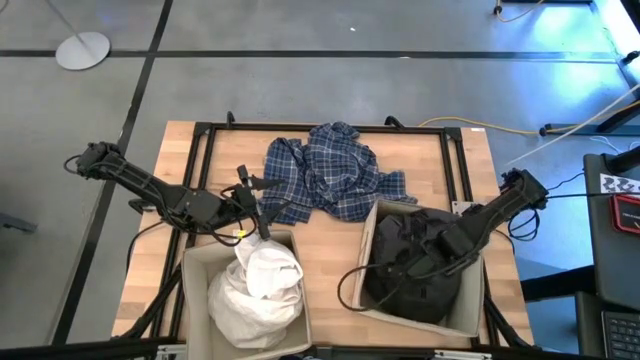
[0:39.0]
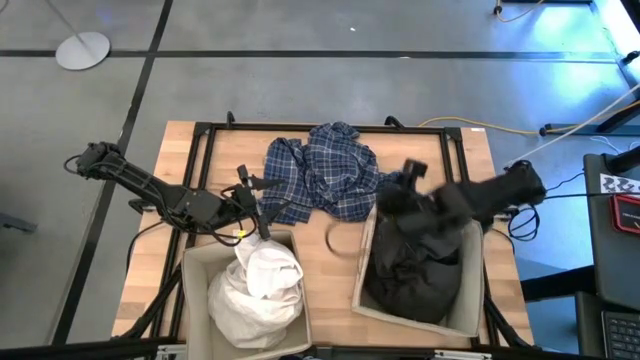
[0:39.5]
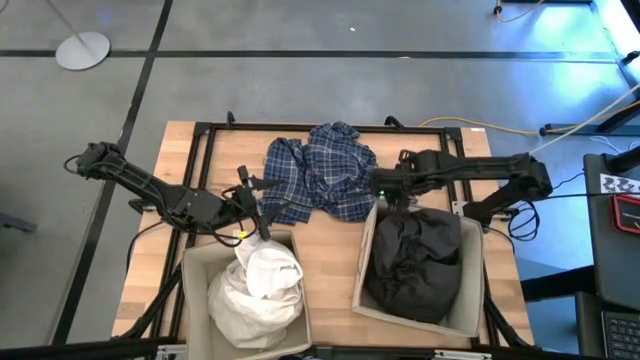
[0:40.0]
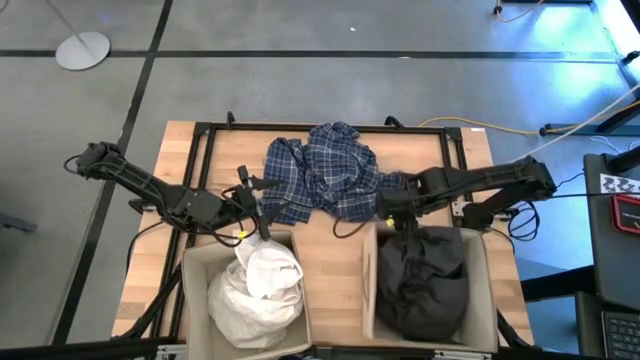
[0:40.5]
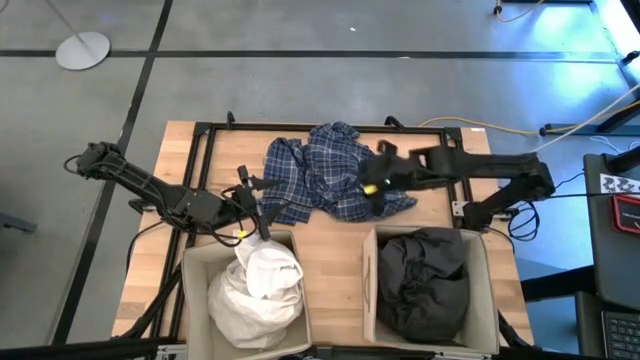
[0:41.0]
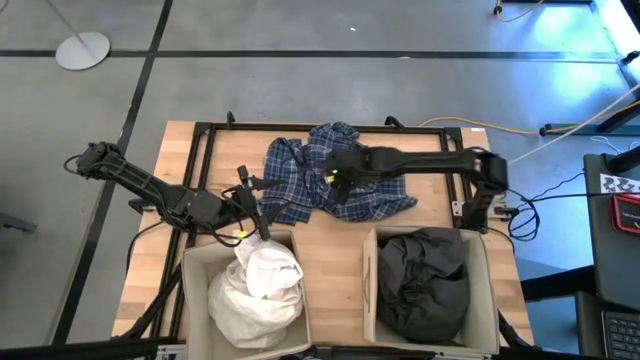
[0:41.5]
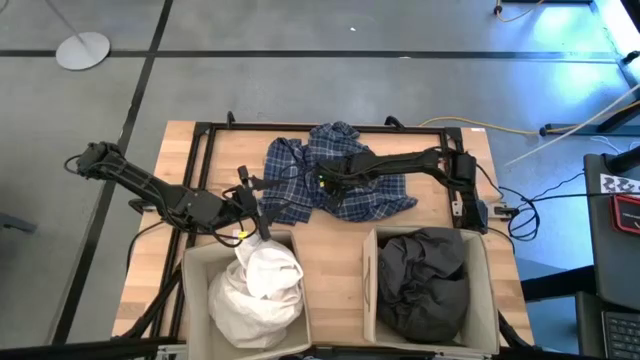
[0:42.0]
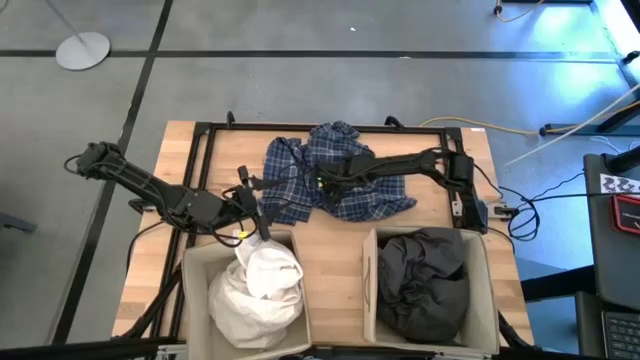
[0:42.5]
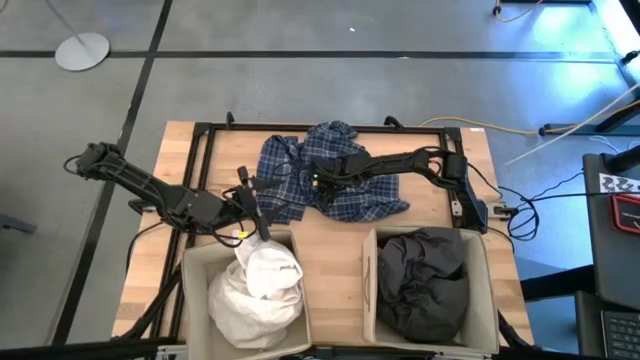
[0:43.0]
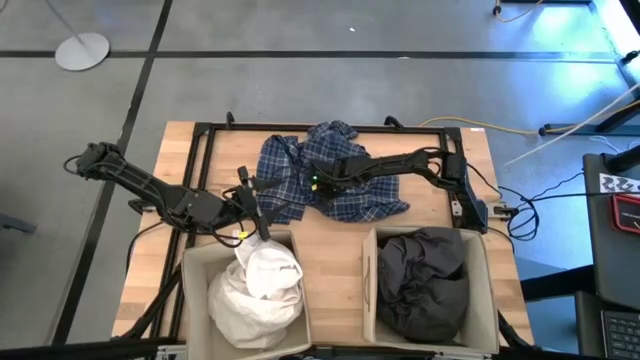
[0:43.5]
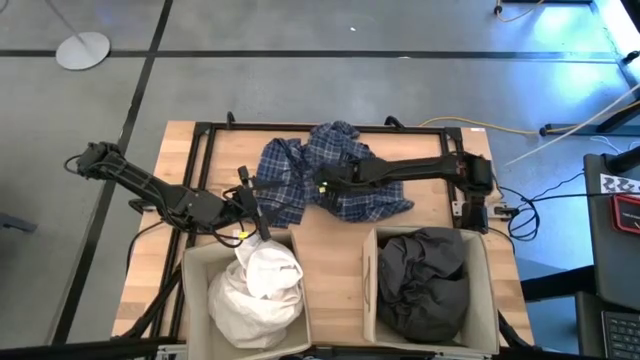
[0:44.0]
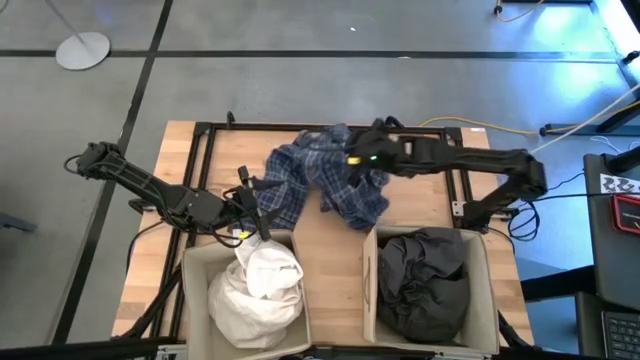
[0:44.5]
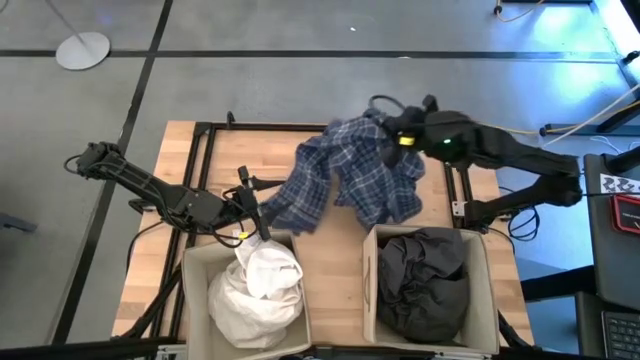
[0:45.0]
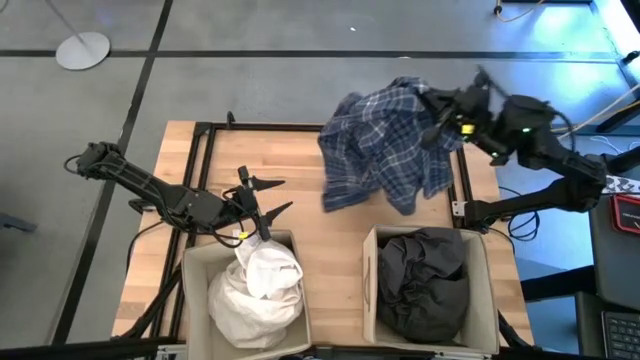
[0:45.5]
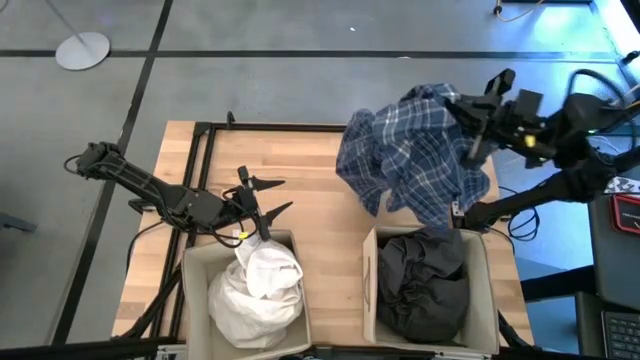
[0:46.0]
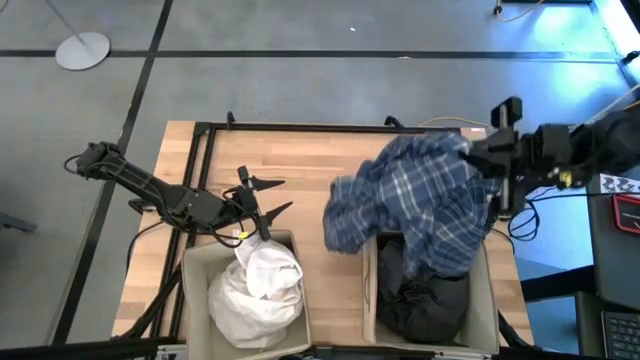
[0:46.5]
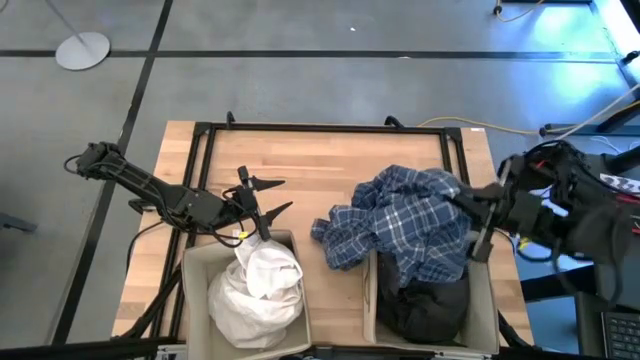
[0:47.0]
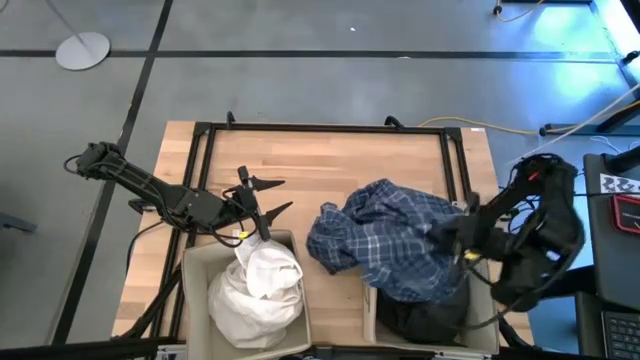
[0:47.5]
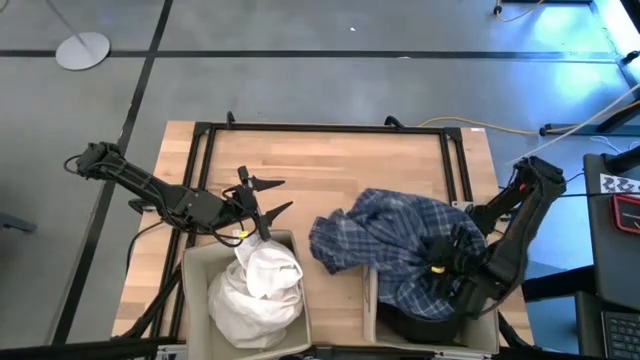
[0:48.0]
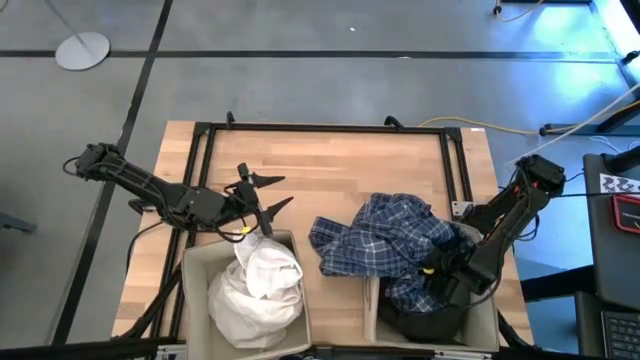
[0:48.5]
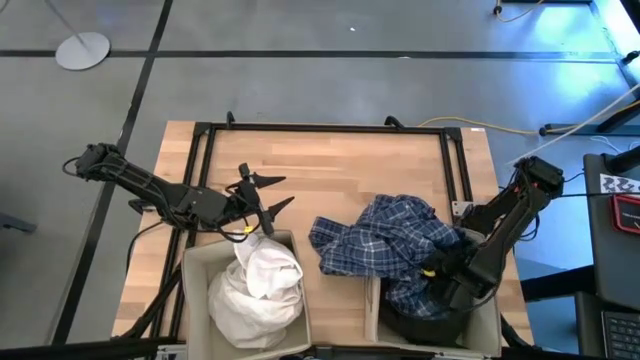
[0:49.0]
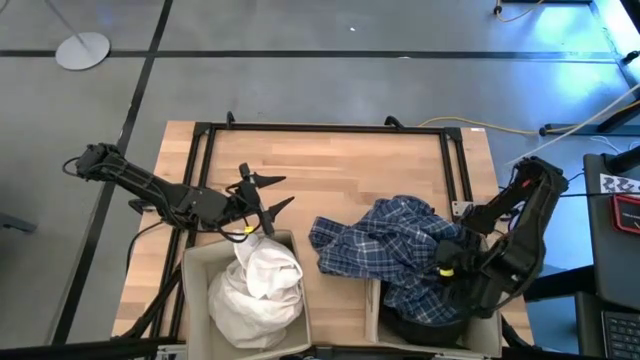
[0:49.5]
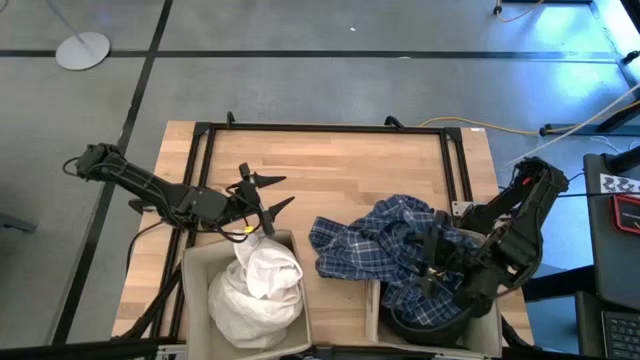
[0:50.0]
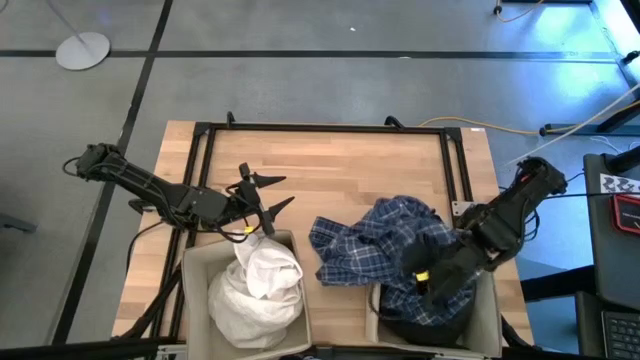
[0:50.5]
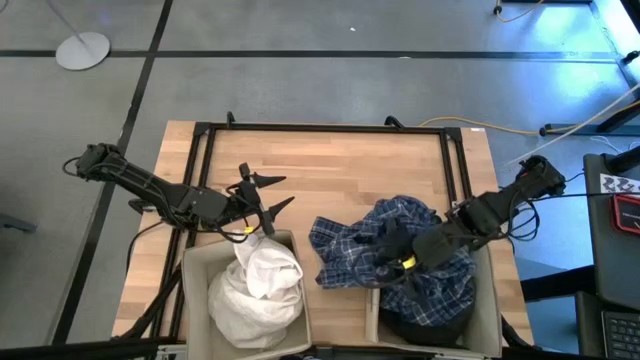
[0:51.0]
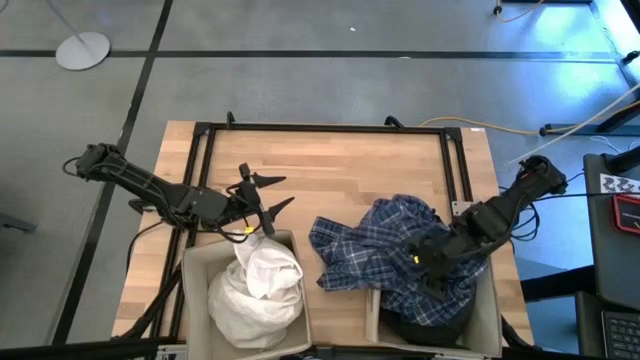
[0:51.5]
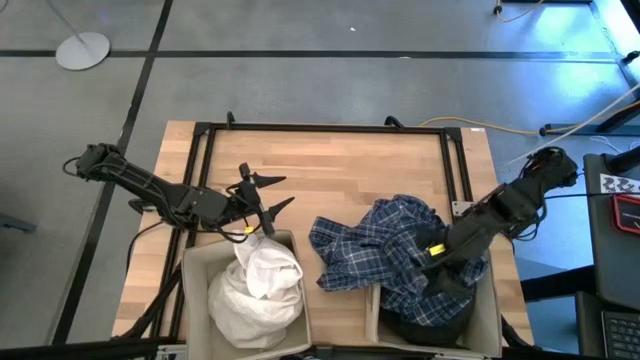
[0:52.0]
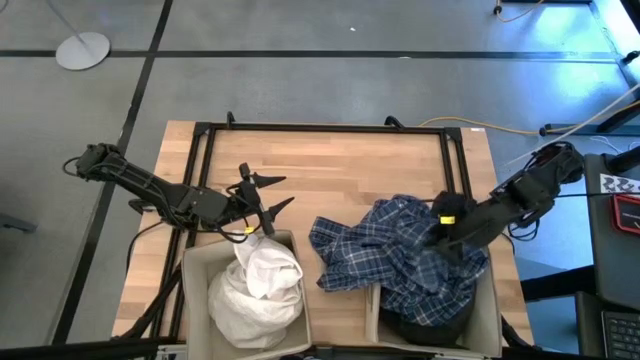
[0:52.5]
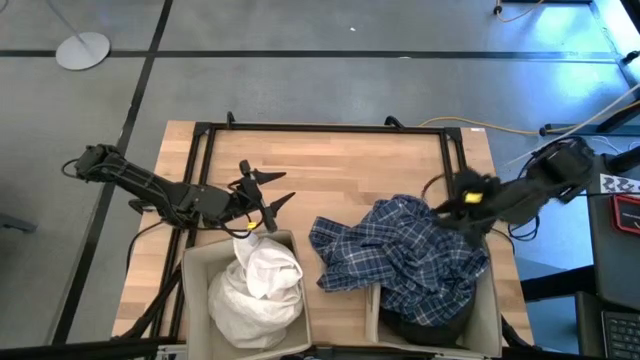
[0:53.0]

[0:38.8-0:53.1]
Task: Sort clothes
Put the blue checkered shirt into the right laundry organizer

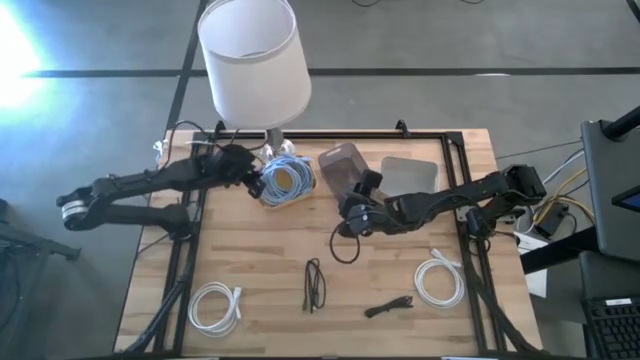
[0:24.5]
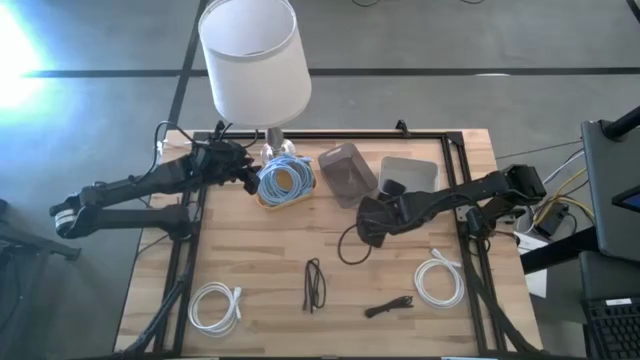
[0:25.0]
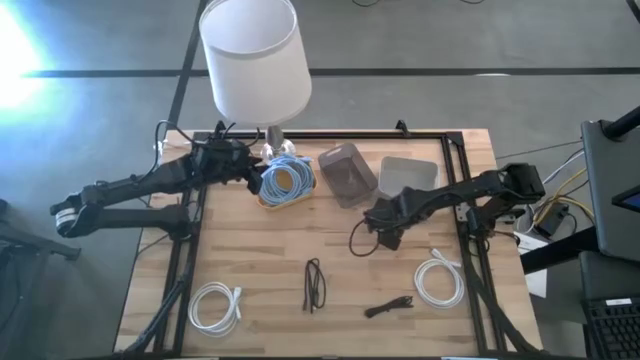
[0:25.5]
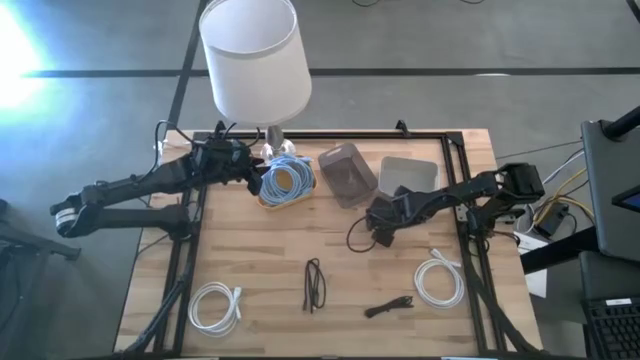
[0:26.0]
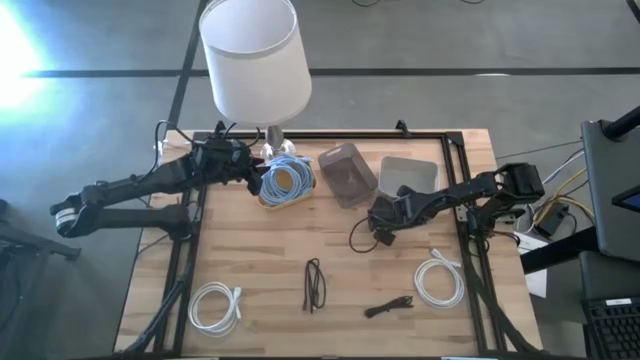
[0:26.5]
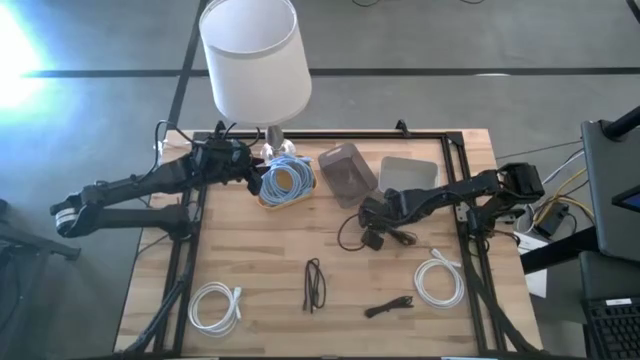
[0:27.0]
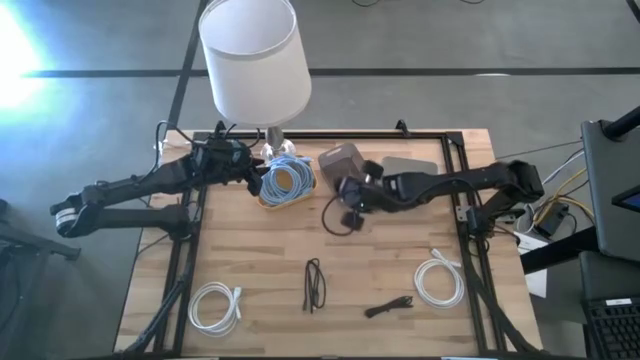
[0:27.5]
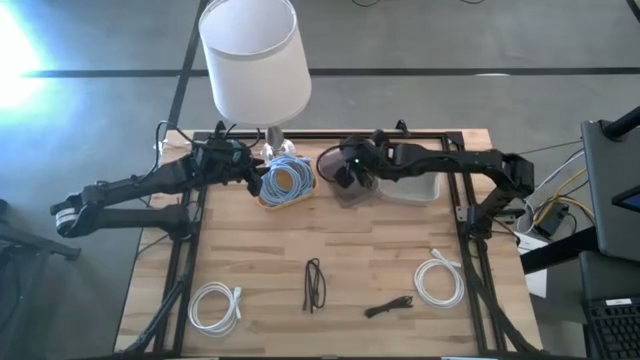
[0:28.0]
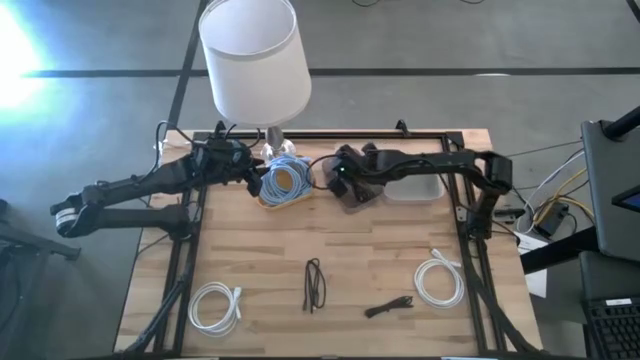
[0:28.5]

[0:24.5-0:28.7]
Task: Pick & Place USB Port
Put the top black charger cable into the black bin

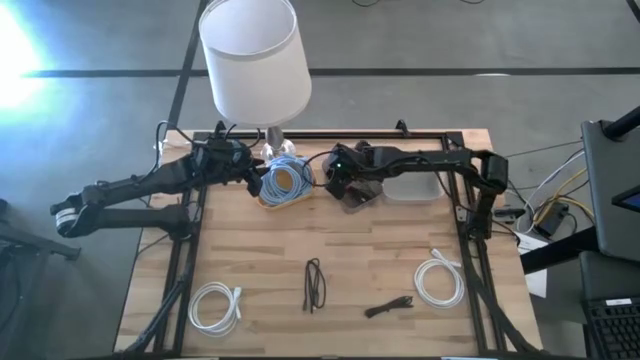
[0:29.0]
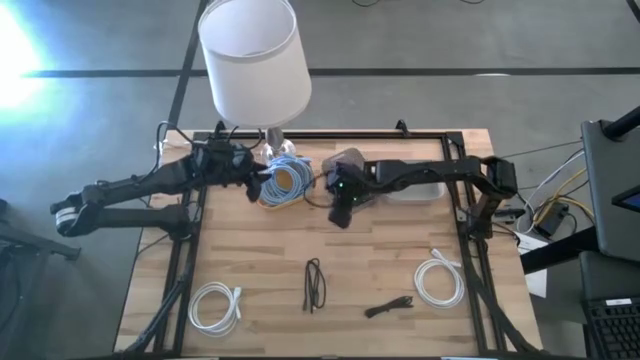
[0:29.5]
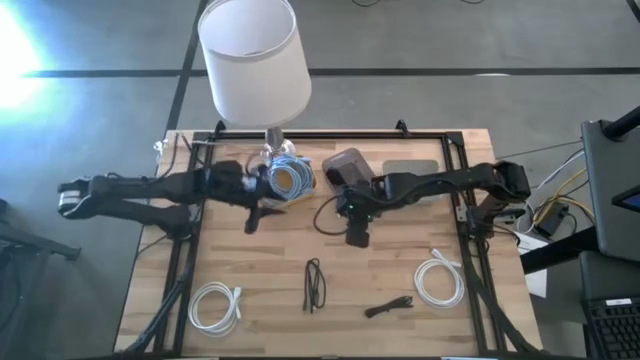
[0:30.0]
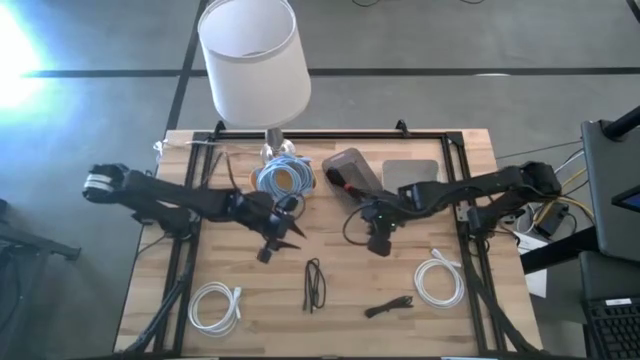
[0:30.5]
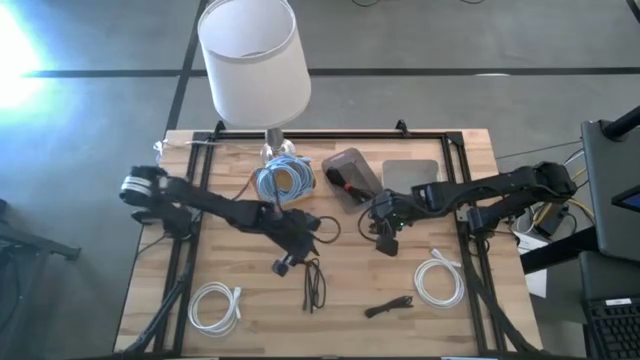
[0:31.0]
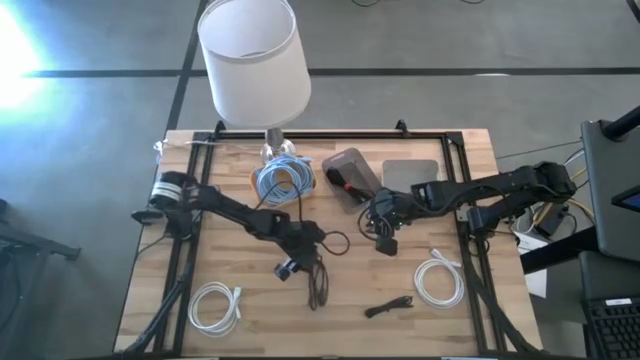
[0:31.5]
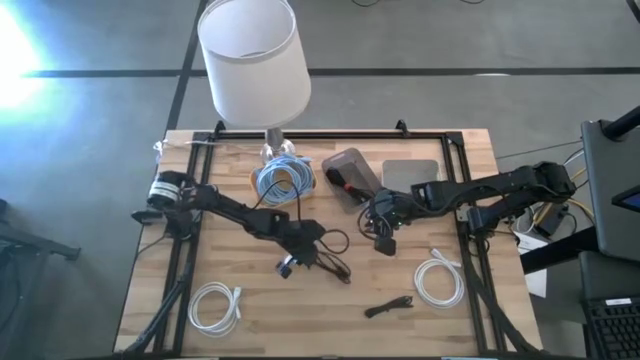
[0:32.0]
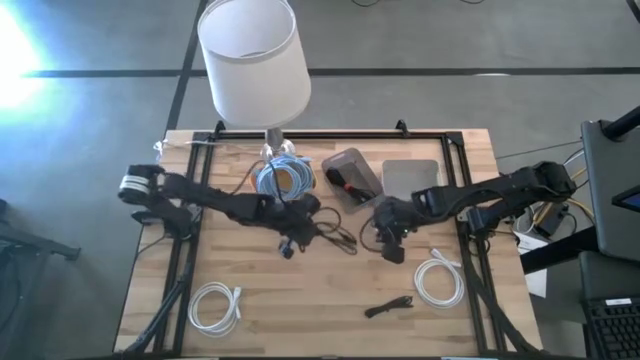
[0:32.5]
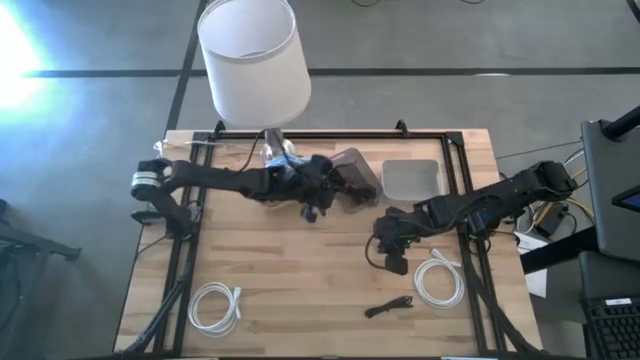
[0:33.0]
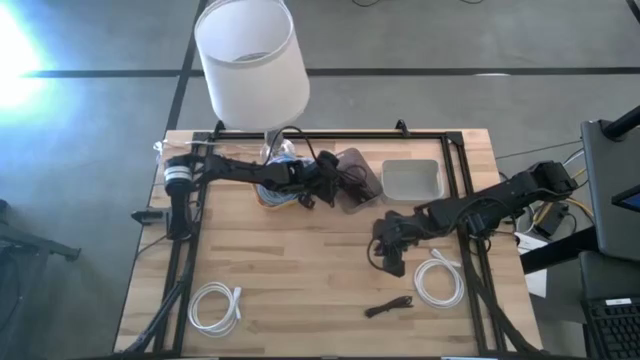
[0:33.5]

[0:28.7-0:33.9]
Put the left black charger cable into the black bin
